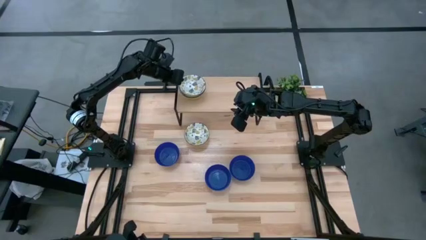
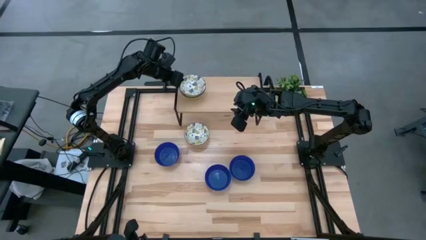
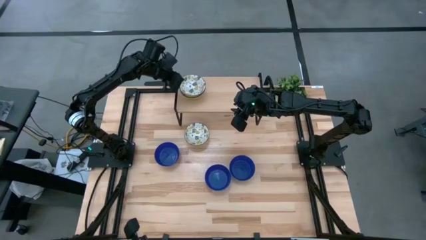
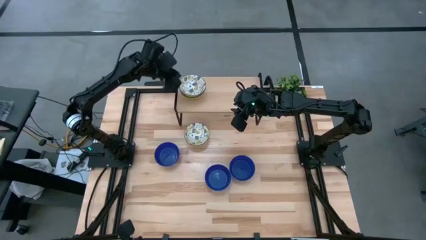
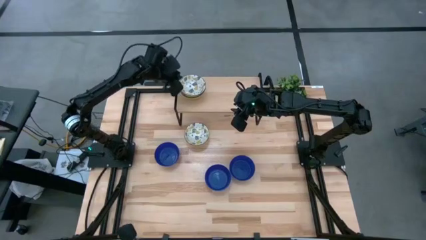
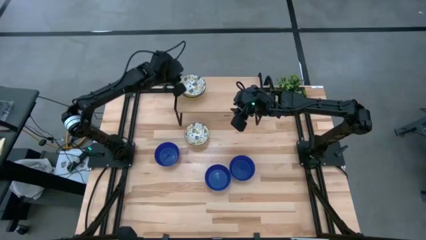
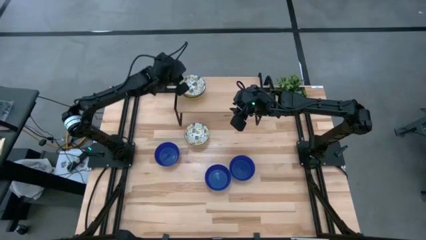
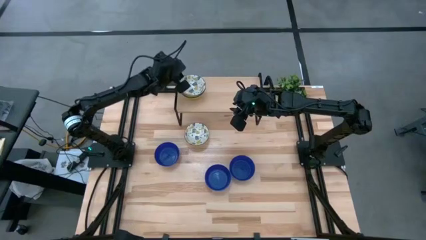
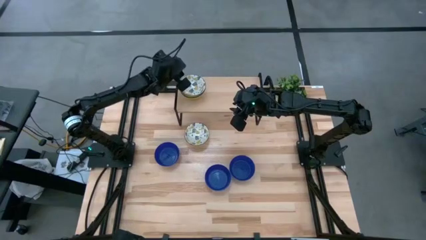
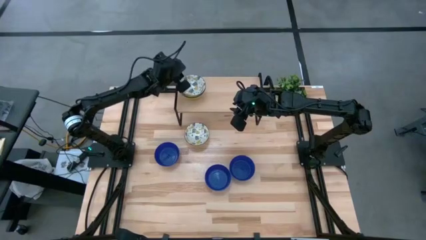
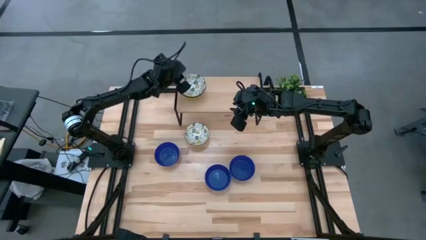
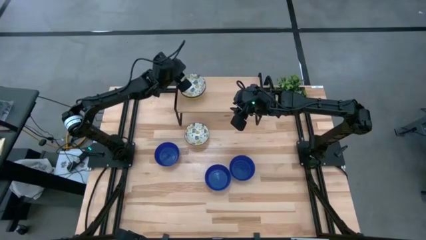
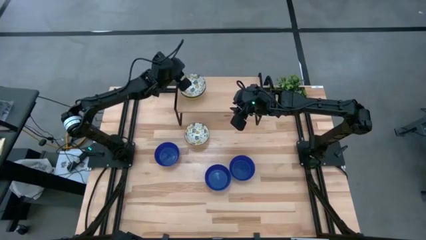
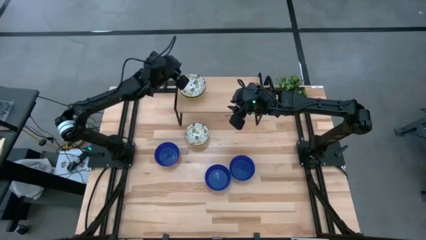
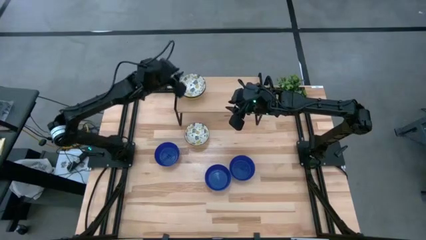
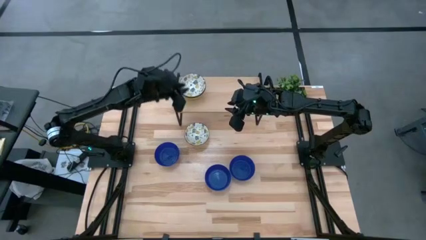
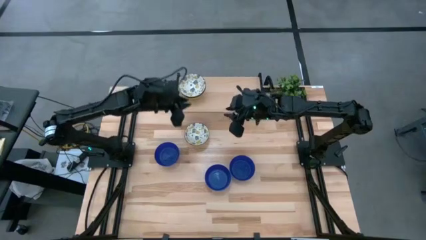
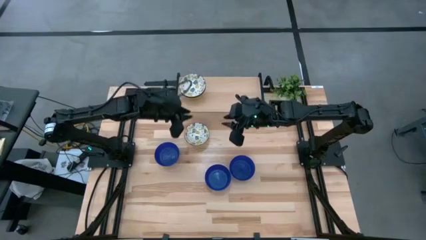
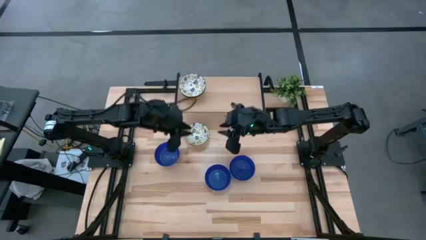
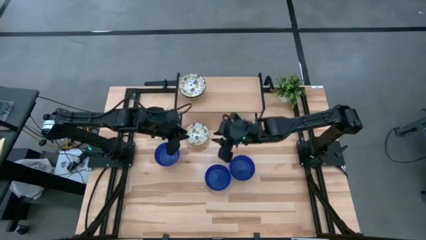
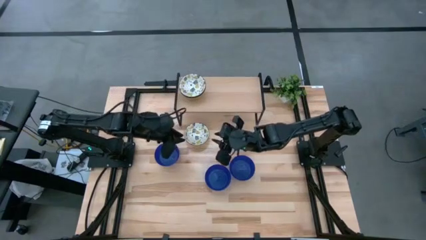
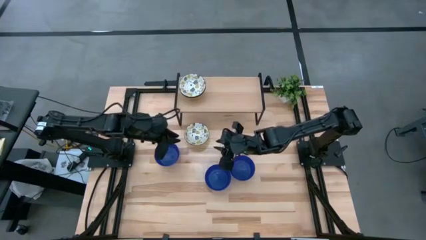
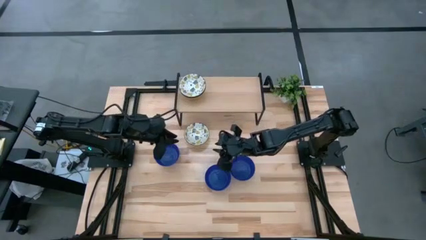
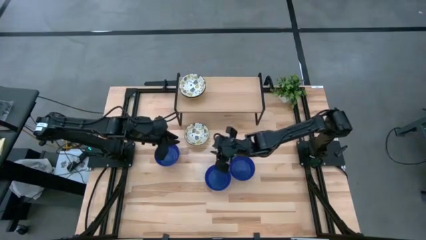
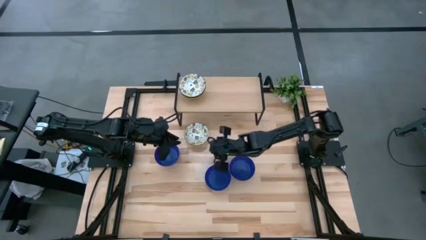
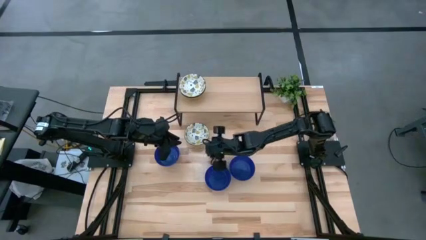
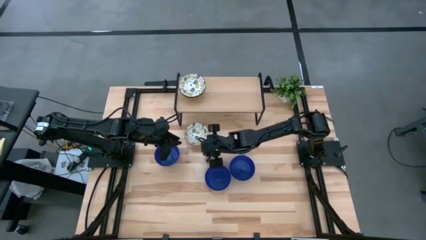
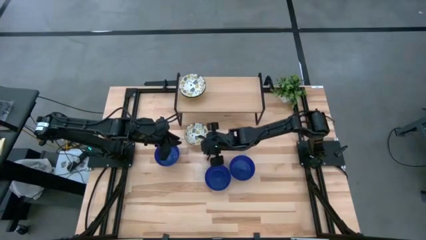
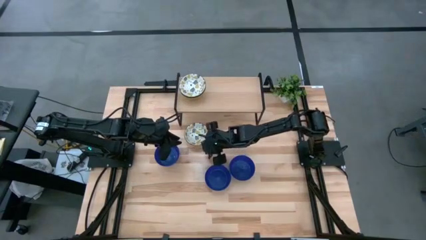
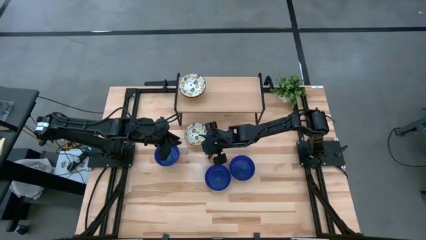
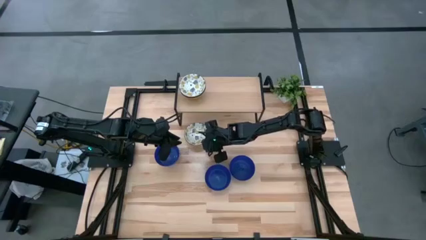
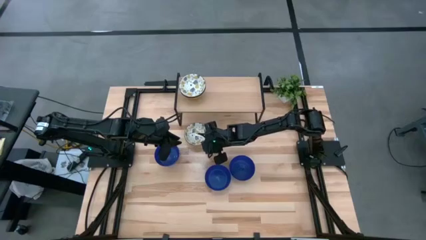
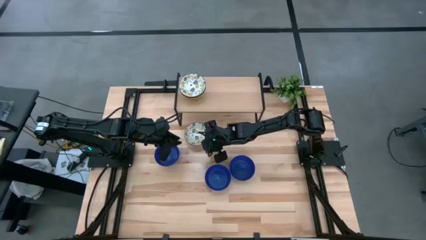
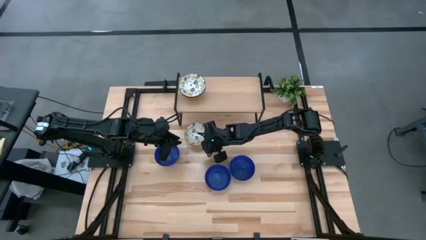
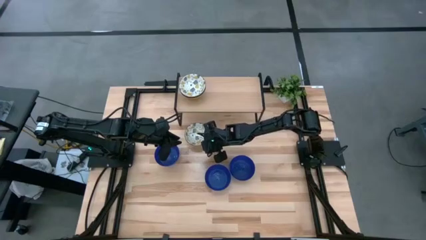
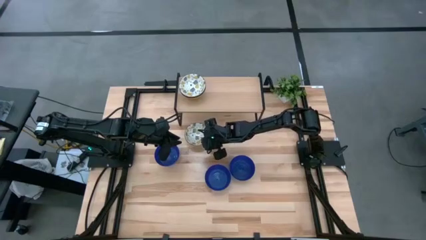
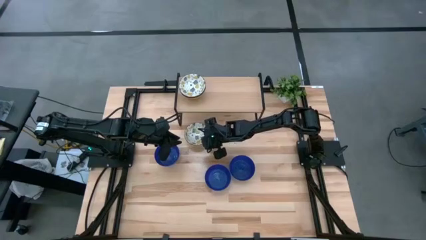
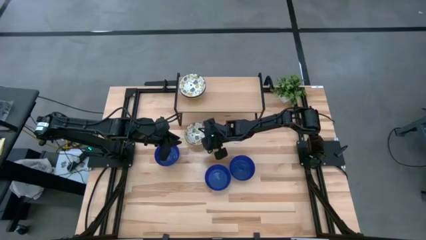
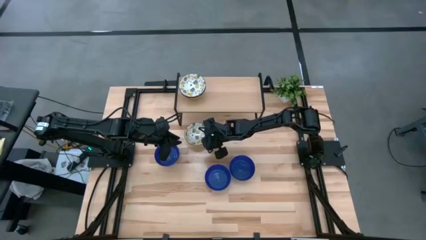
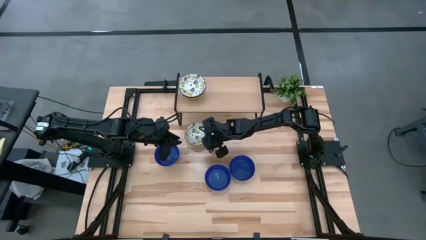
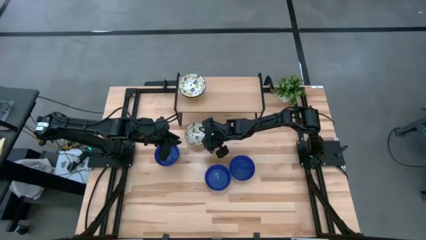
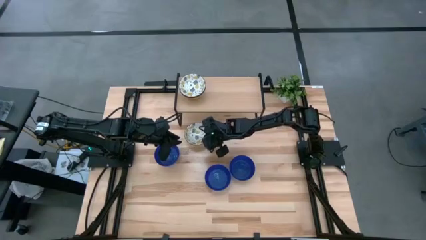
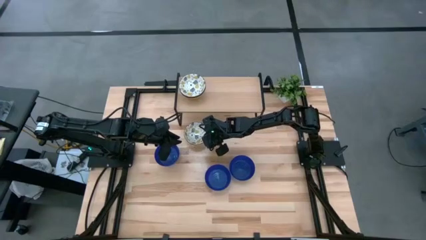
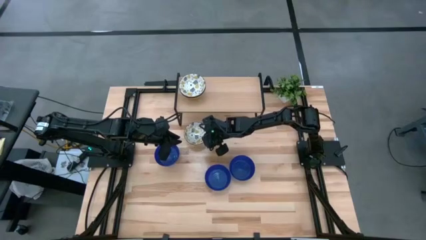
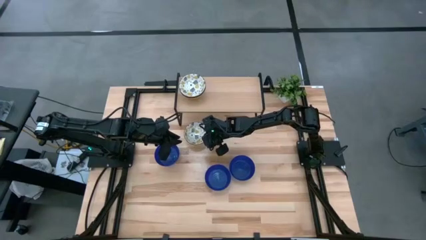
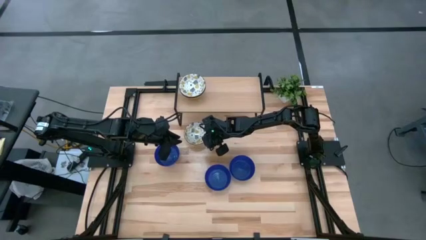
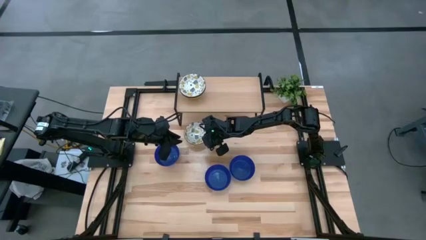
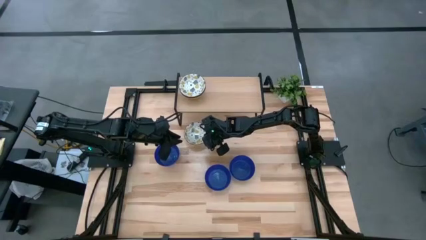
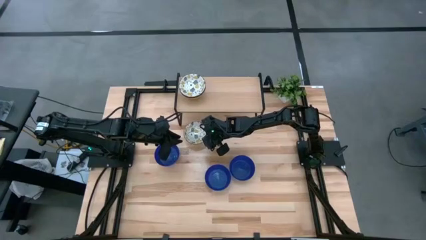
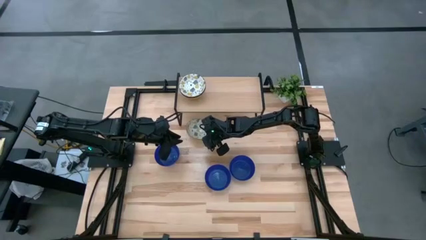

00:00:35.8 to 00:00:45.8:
Task: Pick & Place Mini bowls
Stack the white patterned bowl on top of the white patterned bowl on the shelf
